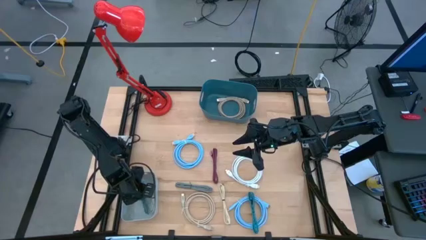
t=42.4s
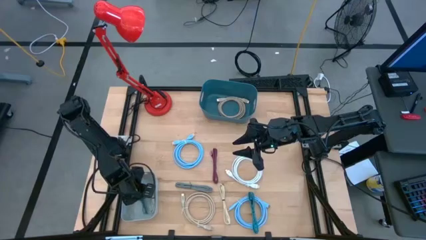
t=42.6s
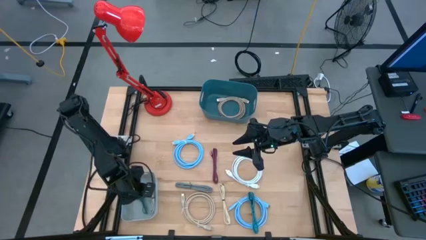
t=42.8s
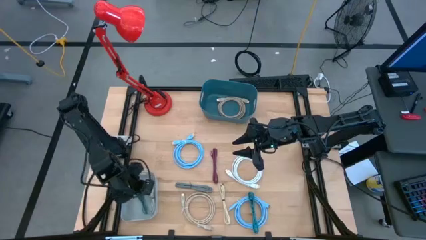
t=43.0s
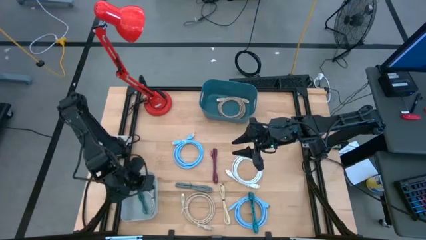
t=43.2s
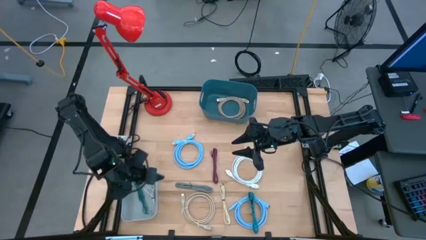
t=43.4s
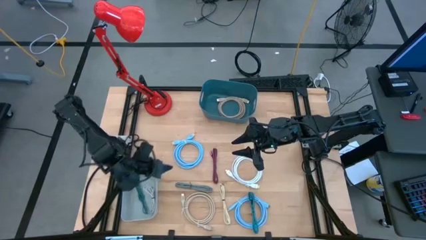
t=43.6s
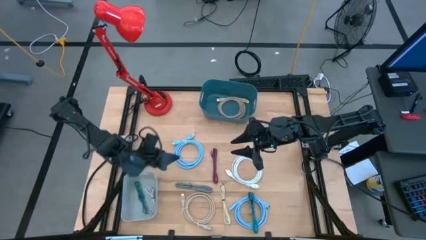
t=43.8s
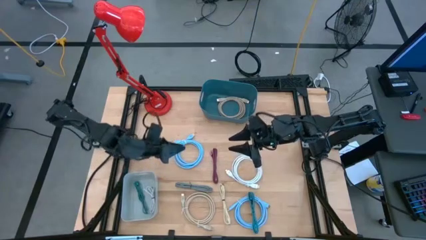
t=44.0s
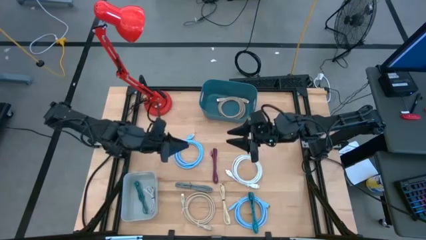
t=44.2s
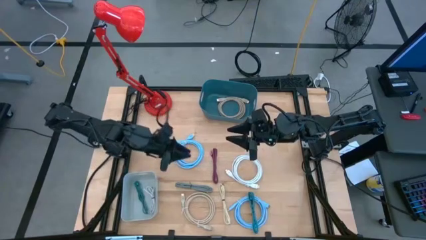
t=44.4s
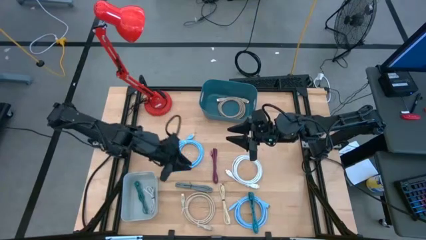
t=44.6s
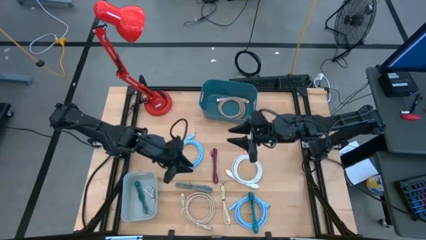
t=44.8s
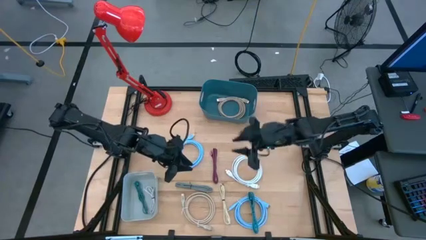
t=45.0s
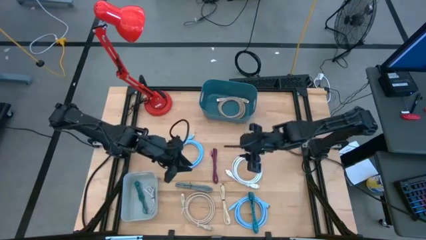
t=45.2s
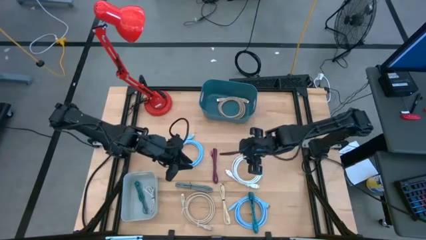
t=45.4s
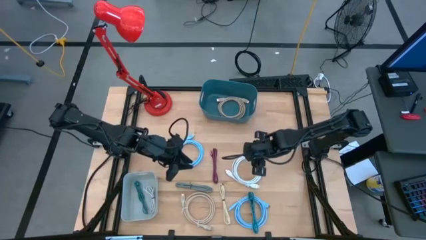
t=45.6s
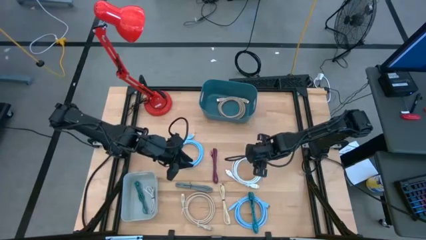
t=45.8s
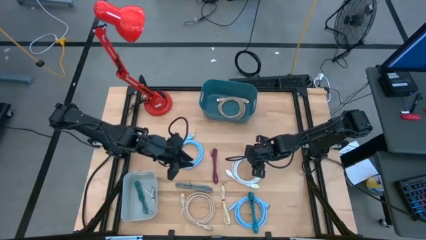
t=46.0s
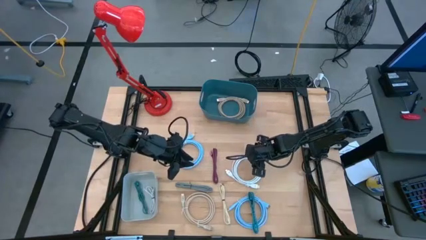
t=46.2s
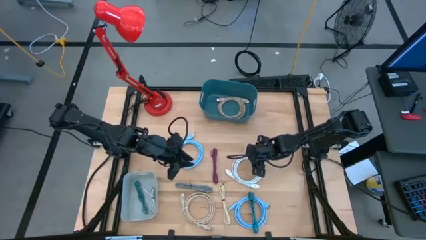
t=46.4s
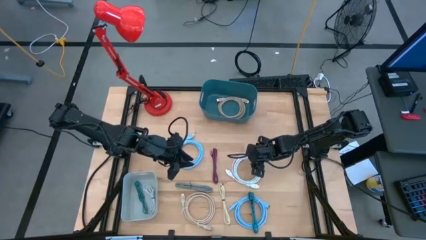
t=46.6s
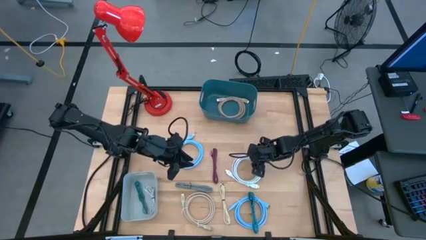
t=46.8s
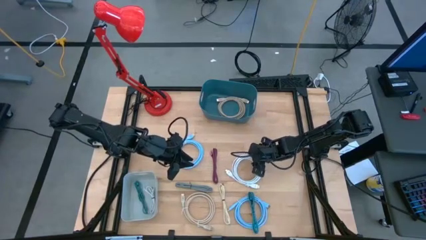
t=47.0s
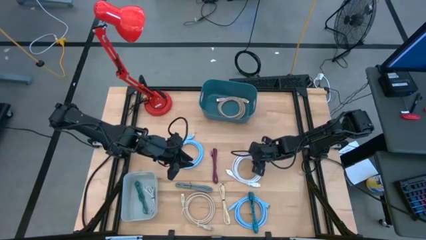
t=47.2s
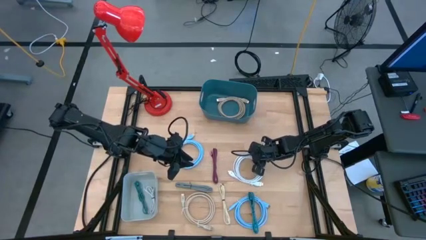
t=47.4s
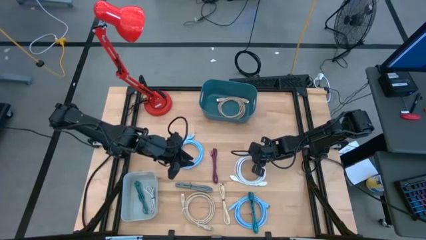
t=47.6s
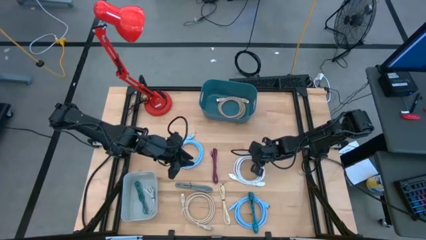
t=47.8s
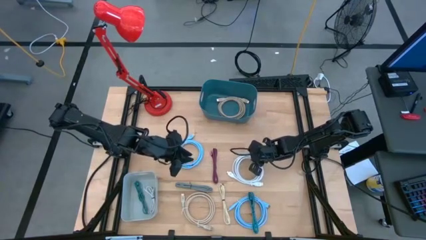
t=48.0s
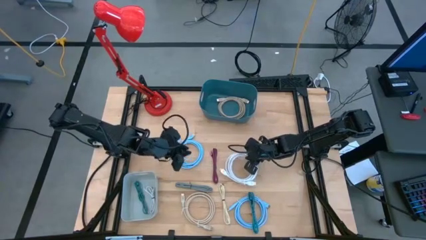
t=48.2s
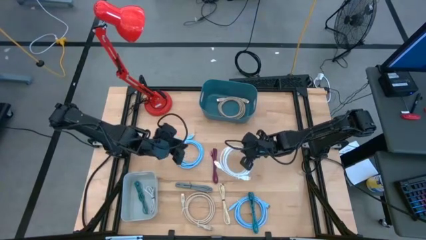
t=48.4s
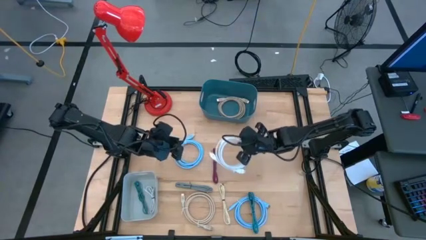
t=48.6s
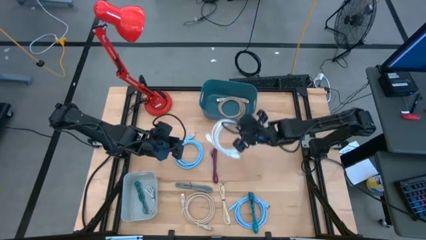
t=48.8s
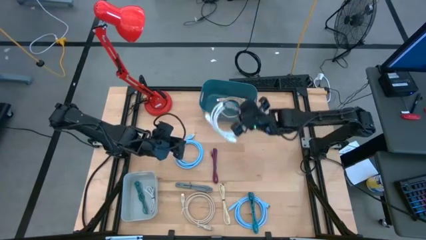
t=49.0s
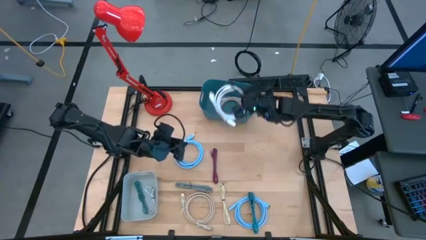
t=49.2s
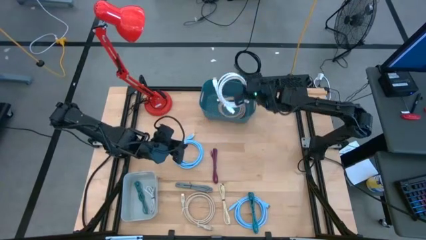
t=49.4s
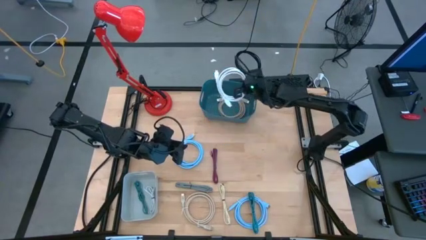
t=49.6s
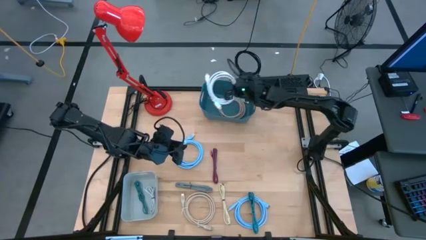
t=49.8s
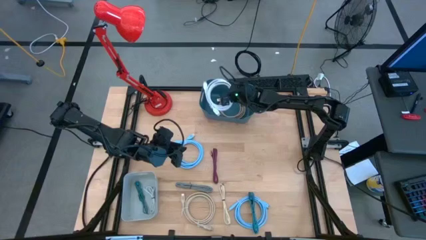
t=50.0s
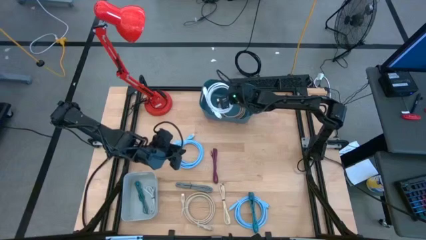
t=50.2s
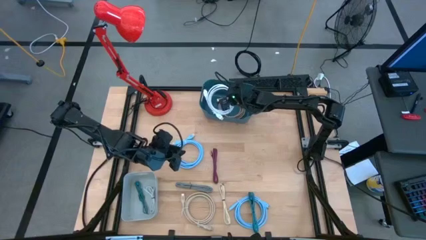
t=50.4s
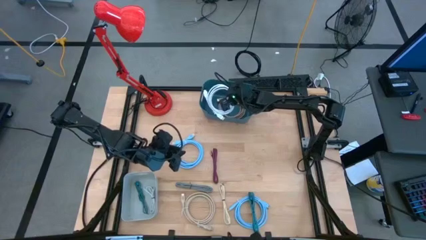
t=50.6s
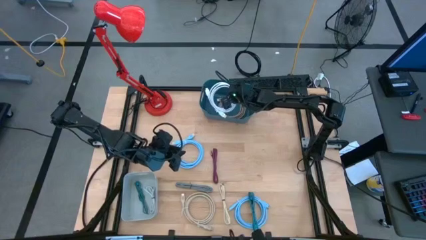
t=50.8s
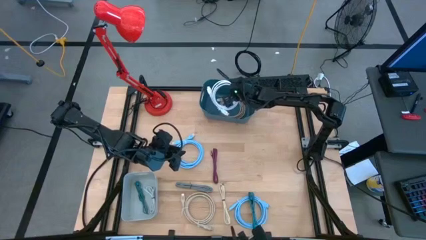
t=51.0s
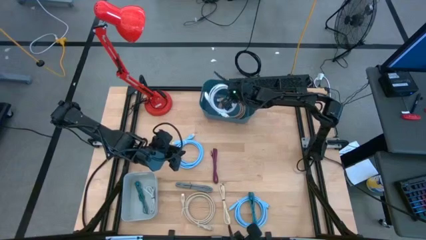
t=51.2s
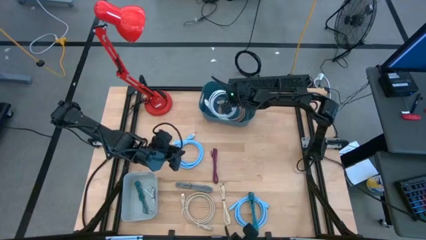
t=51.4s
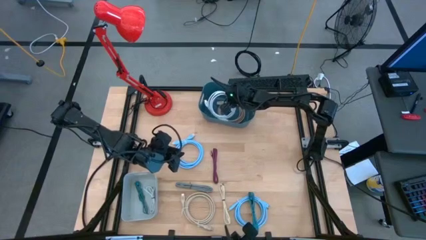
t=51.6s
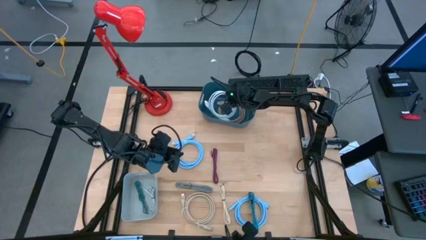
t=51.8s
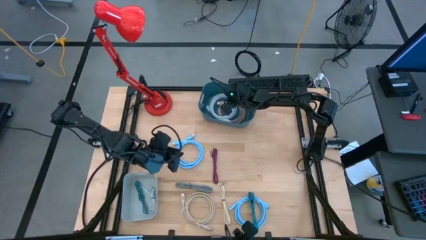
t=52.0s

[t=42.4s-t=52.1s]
Task: Pick & Place USB Port
Put the white wire cable into the blue bin

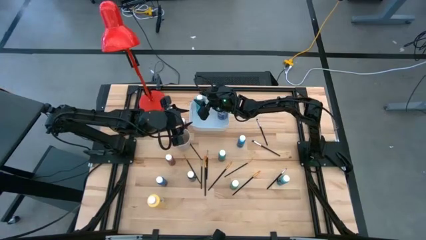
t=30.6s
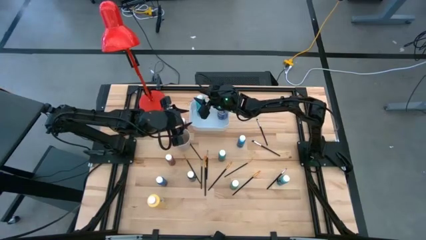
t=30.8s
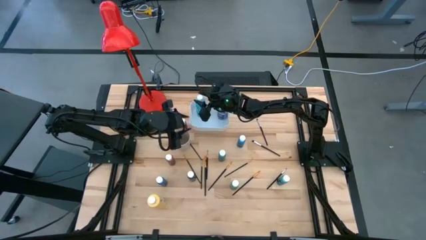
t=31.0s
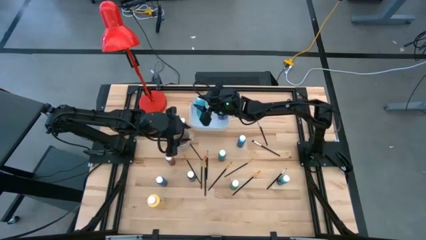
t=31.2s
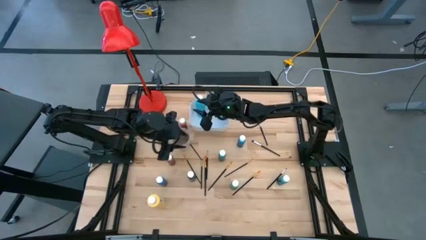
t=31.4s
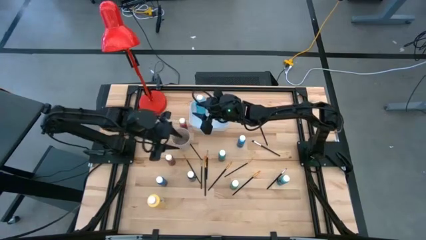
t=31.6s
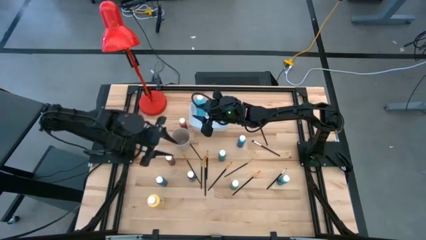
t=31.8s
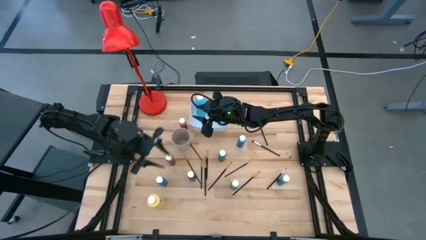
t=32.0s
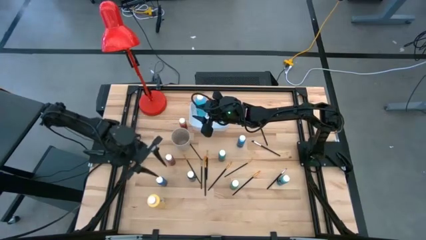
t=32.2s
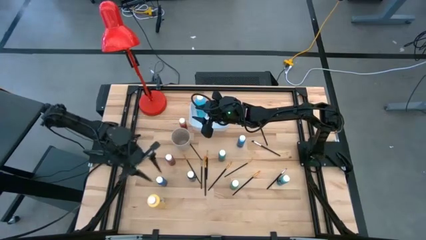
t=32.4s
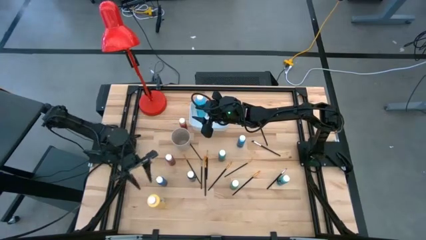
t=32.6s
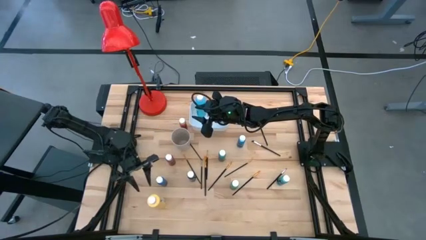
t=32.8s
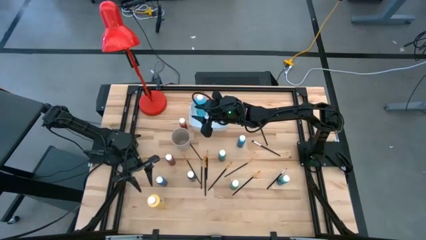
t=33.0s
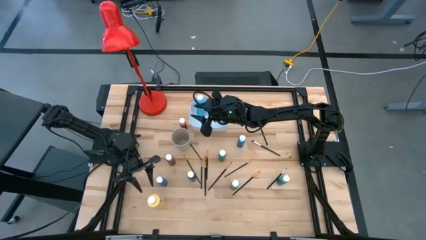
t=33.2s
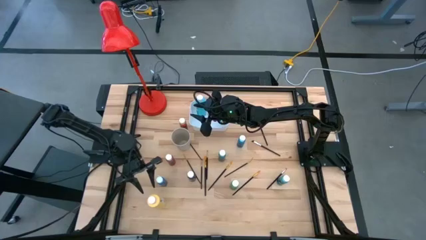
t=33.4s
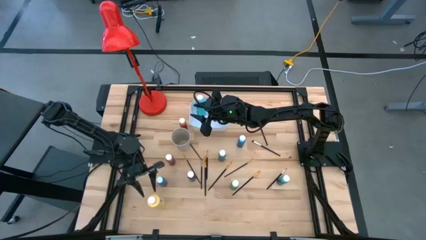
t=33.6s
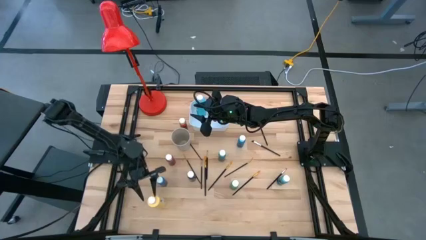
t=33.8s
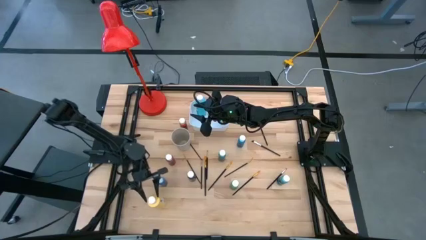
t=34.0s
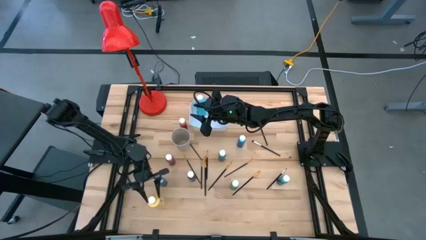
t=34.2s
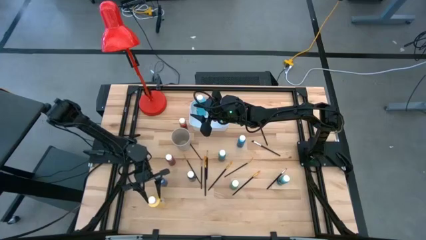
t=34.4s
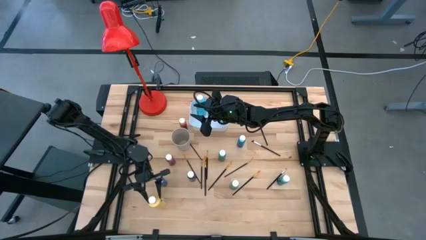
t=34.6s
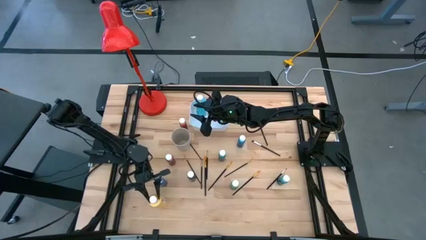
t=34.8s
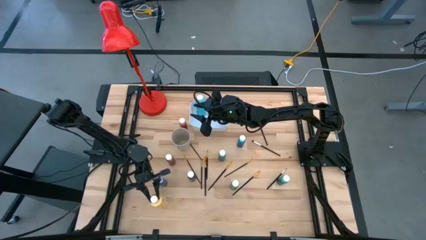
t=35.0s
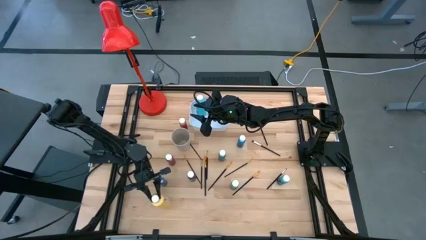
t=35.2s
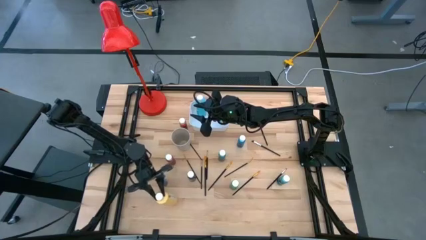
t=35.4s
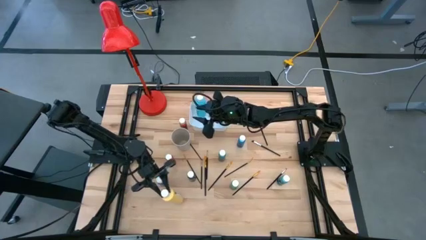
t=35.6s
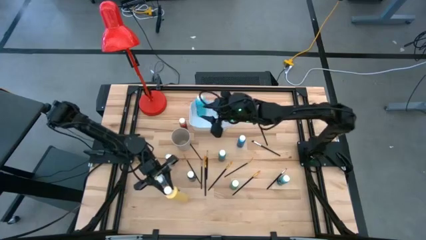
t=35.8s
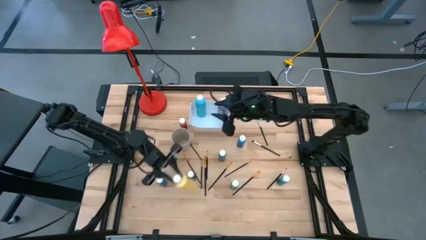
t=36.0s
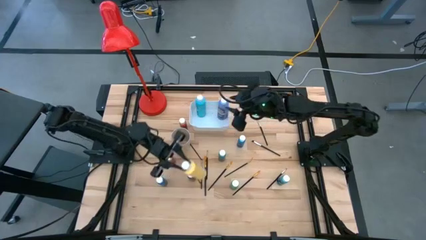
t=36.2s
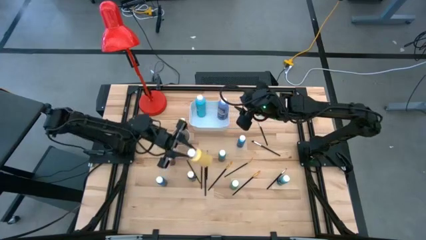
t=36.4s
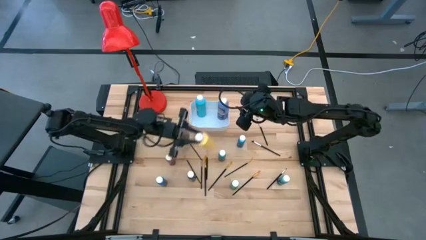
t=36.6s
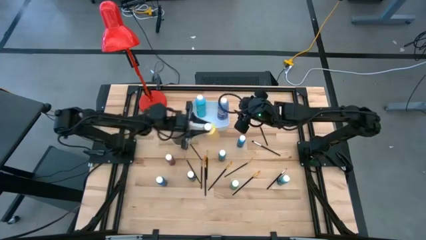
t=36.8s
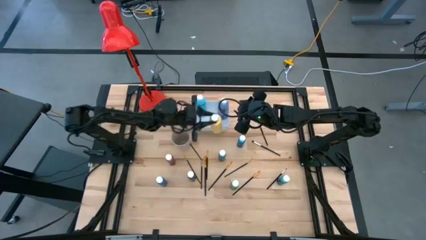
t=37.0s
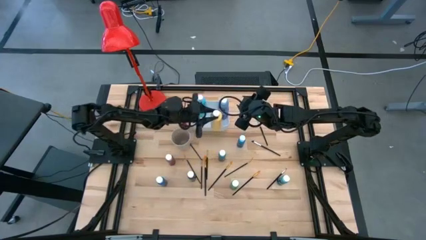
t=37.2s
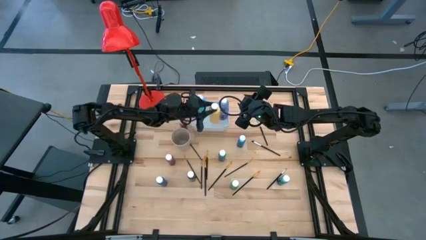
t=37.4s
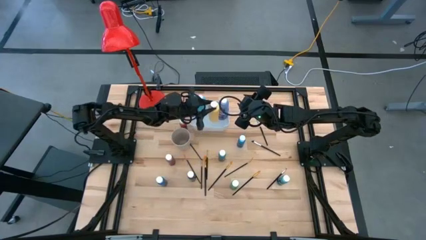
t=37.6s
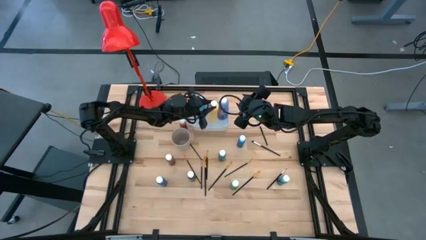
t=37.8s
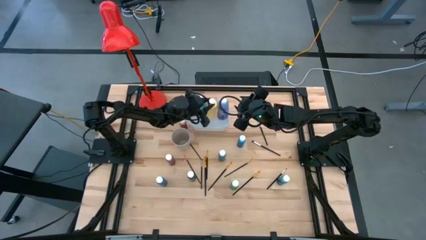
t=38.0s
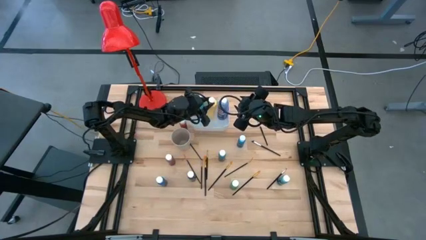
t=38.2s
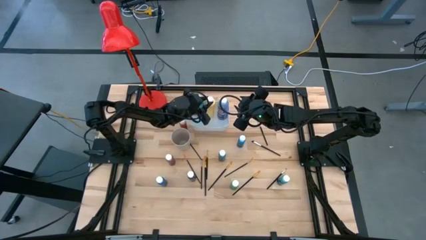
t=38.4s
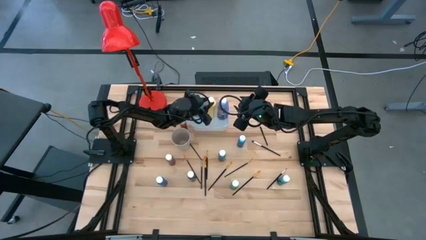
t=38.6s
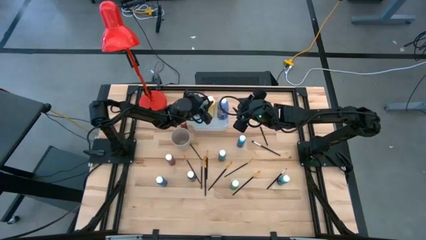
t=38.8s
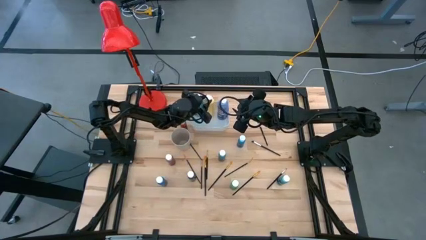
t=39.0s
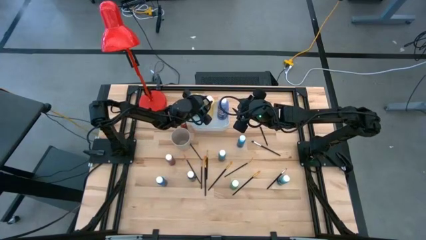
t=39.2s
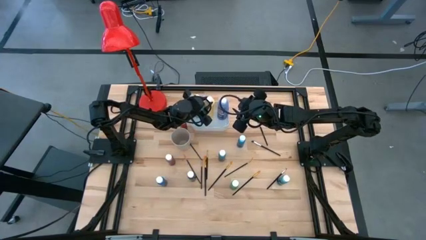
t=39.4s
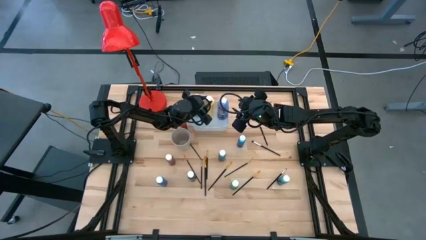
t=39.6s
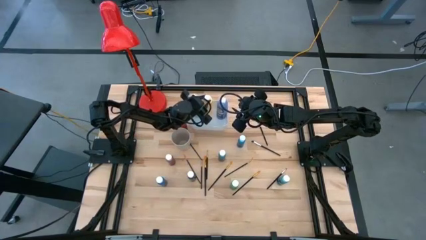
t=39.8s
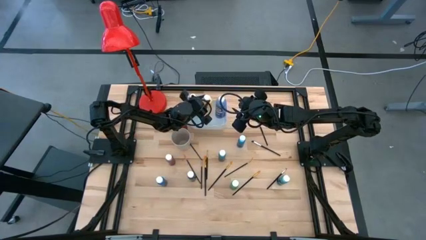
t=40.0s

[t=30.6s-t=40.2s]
Task: Pick & Place Paint Supplies
Put the yellow paint bottle into the white bin
